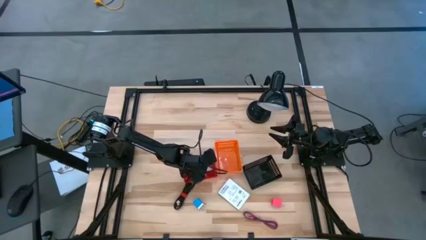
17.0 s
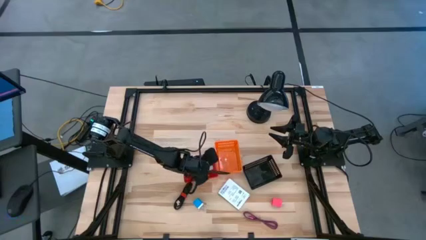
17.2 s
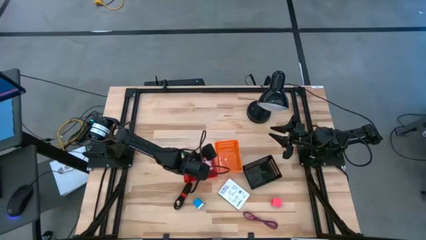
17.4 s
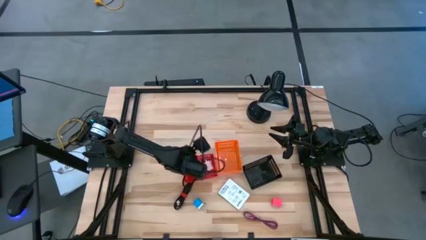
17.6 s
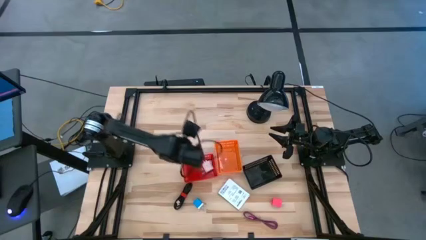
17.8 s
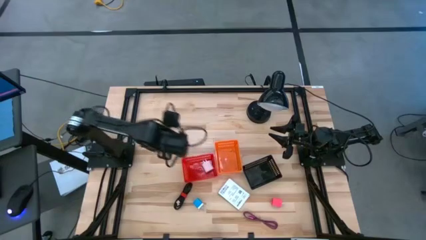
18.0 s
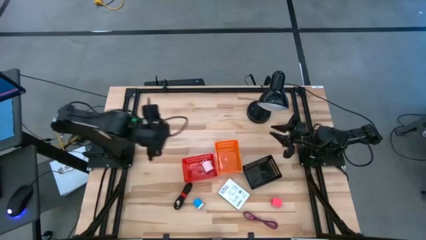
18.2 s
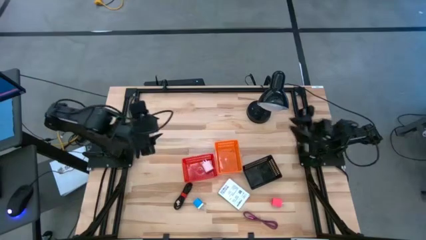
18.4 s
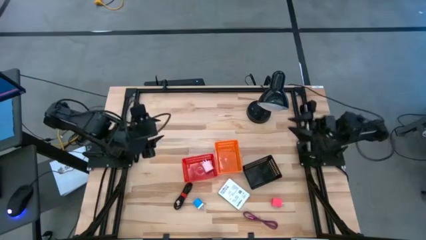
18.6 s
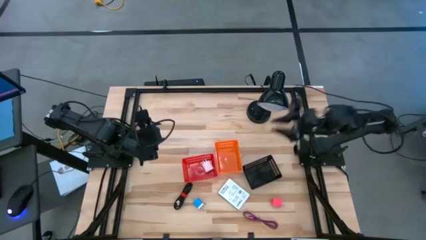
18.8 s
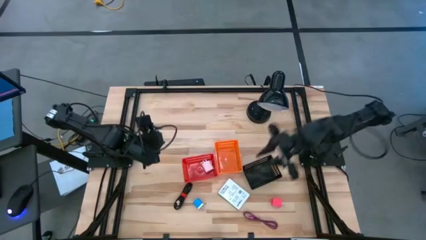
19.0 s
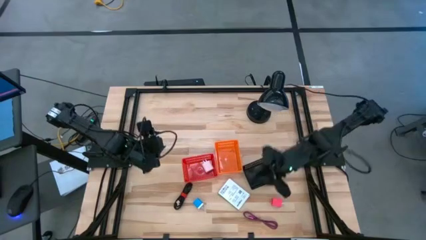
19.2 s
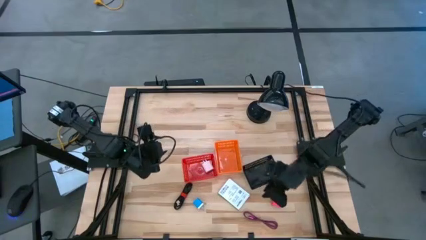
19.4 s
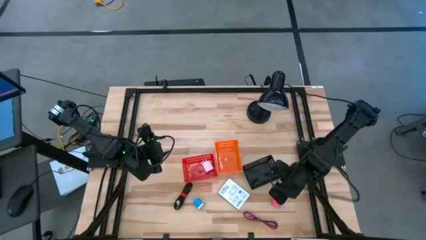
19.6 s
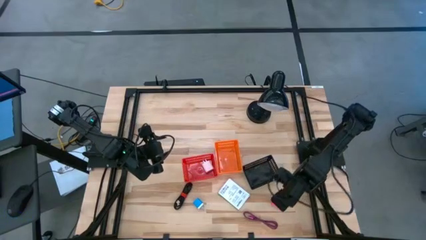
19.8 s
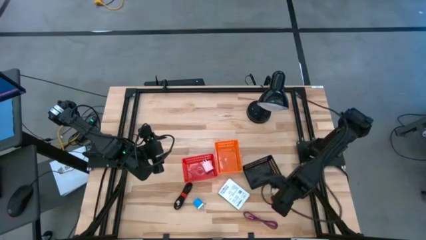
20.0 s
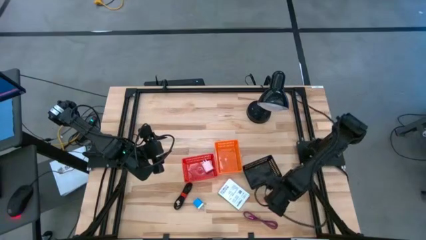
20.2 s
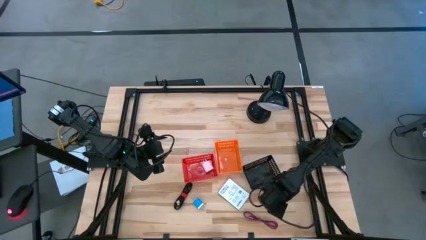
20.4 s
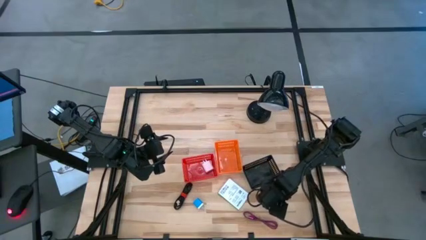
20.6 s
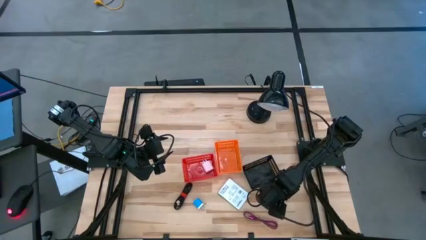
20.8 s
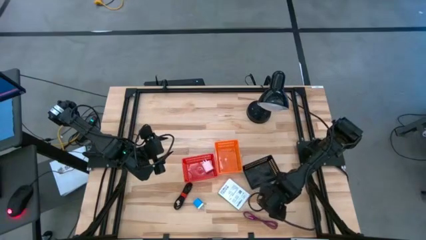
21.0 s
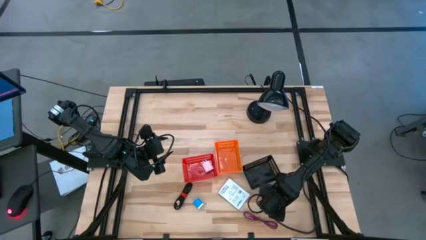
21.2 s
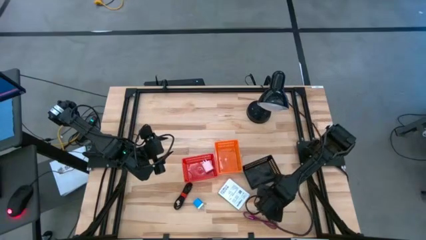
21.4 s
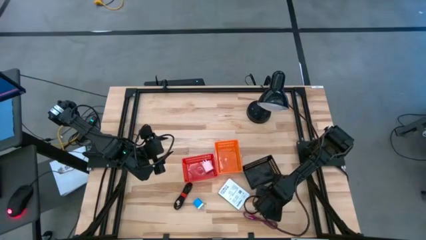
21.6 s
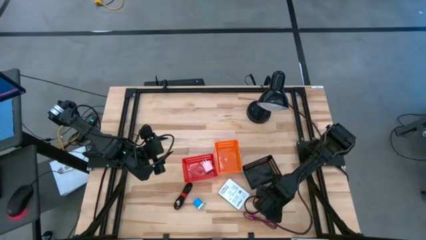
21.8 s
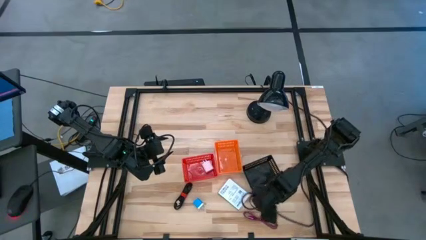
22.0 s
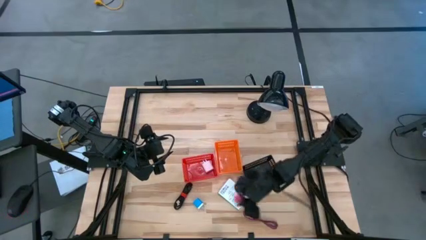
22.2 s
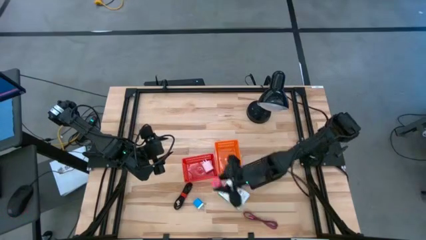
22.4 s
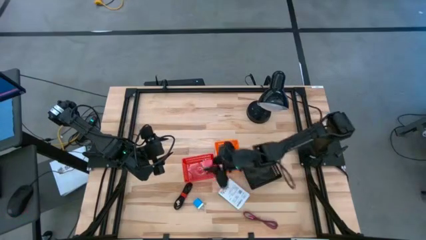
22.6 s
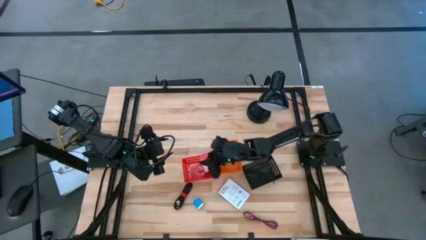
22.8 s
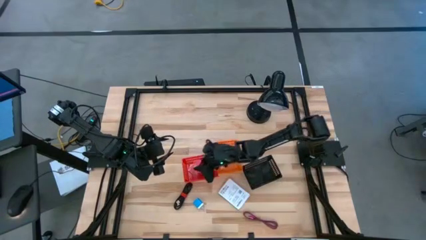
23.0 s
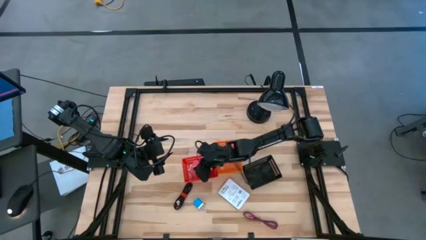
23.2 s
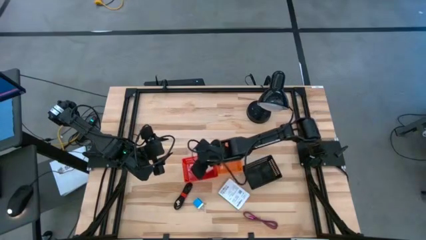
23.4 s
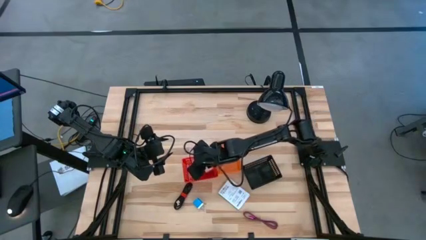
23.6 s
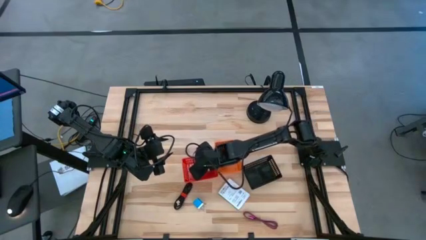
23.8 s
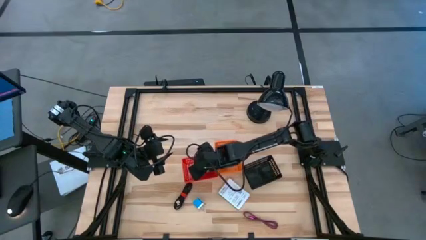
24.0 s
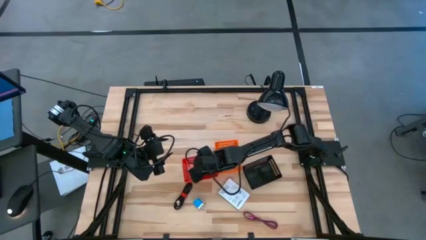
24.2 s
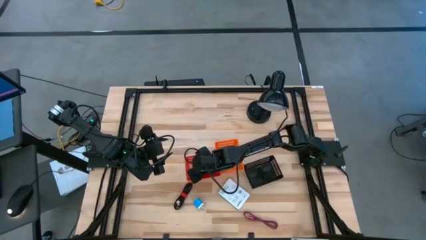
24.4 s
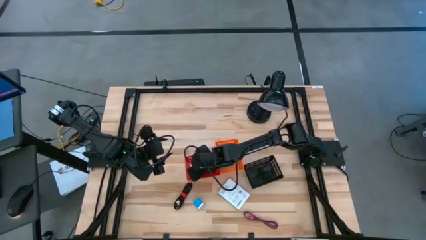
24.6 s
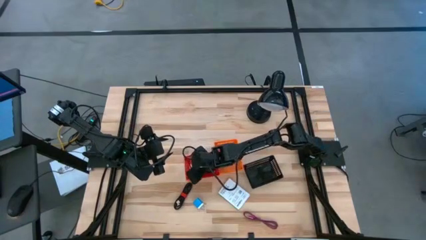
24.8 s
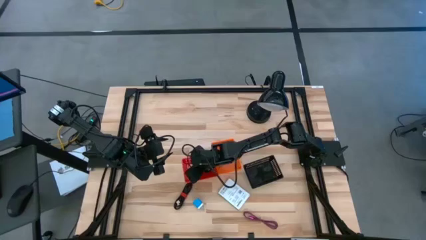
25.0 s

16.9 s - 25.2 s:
Task: Pick and place items into bin
Put the pink charger adapter into the red bin

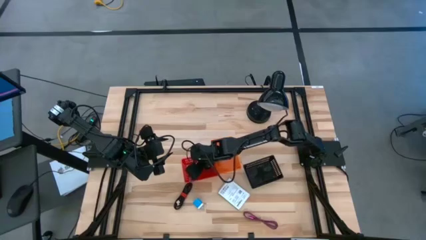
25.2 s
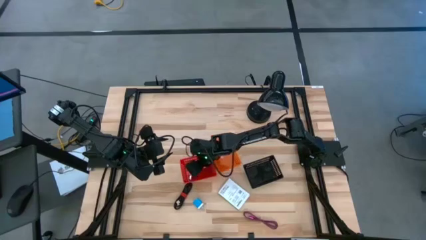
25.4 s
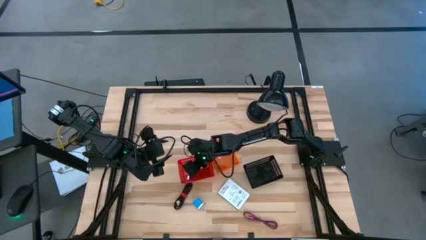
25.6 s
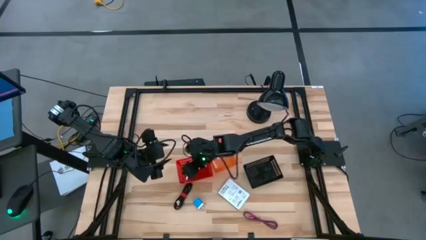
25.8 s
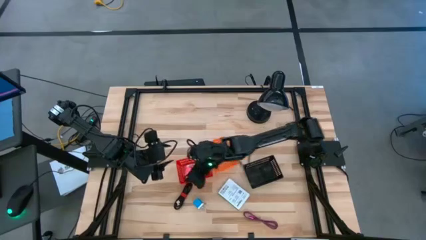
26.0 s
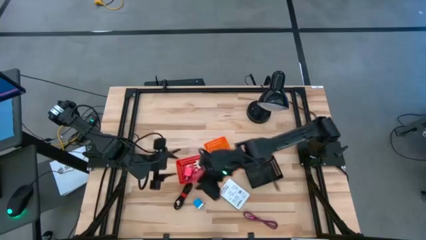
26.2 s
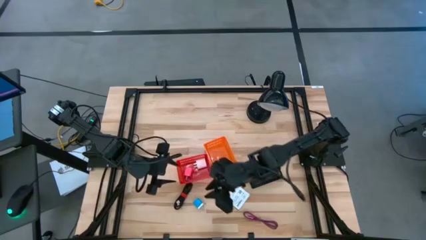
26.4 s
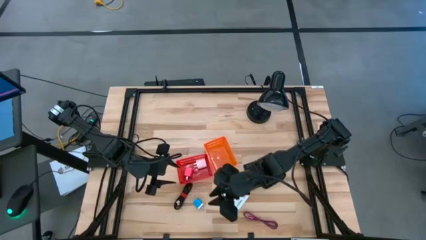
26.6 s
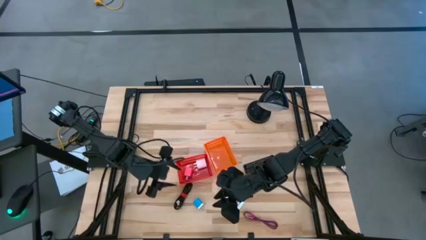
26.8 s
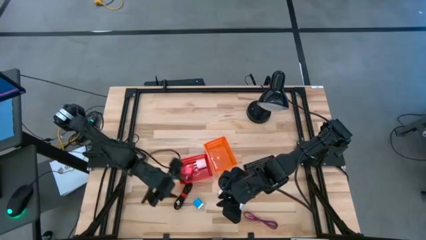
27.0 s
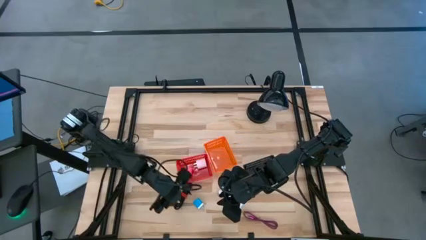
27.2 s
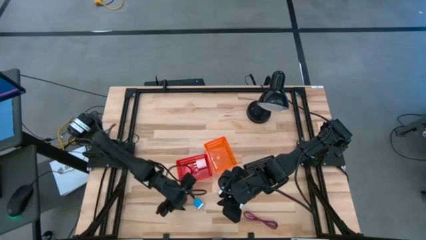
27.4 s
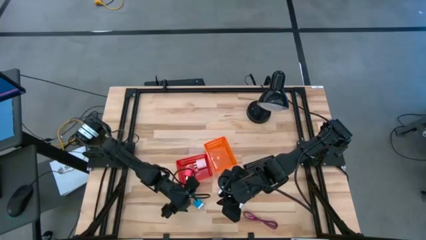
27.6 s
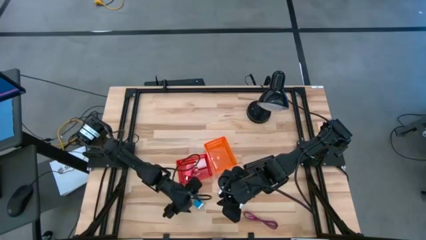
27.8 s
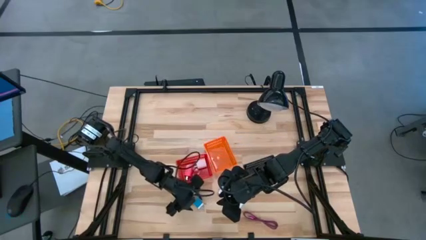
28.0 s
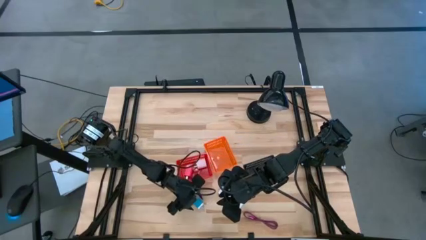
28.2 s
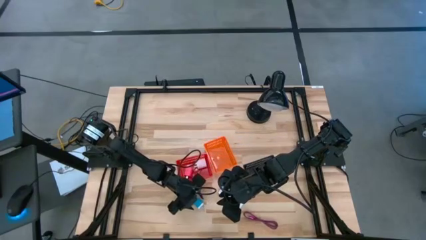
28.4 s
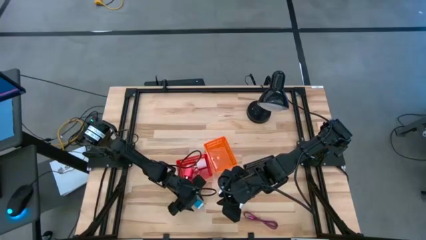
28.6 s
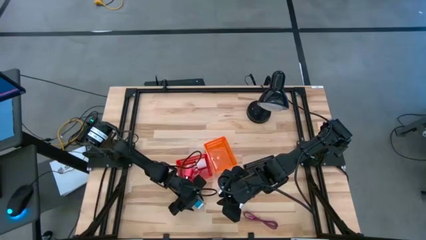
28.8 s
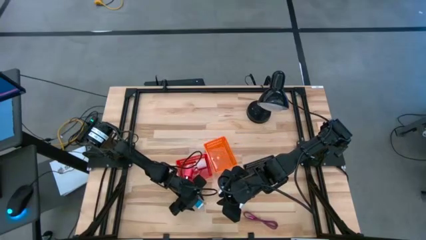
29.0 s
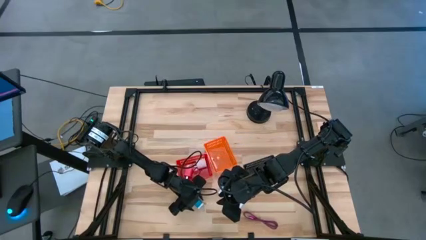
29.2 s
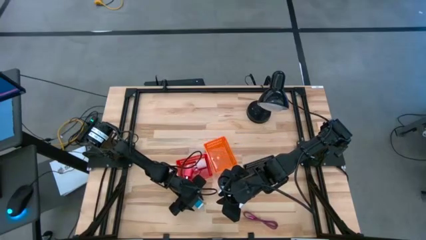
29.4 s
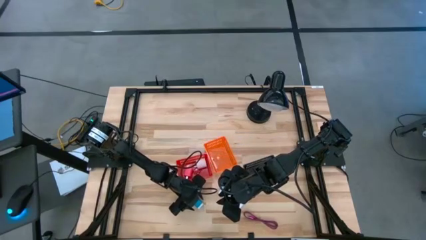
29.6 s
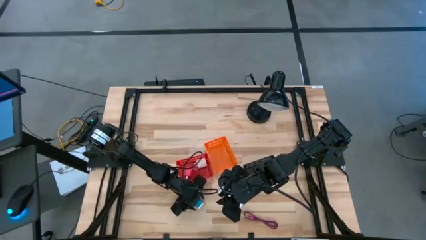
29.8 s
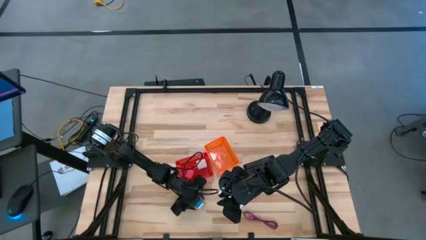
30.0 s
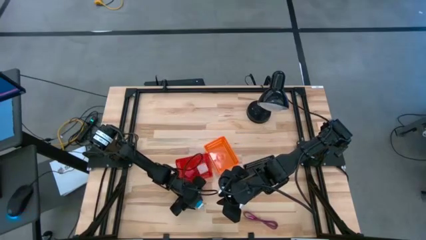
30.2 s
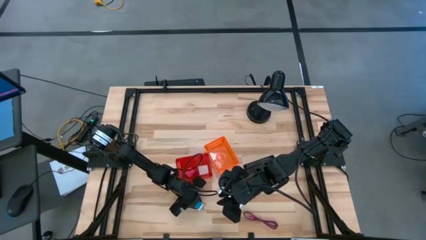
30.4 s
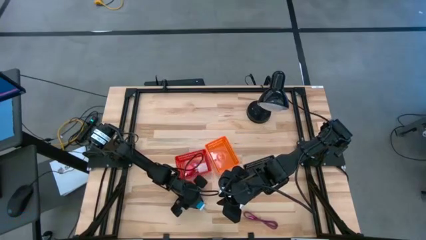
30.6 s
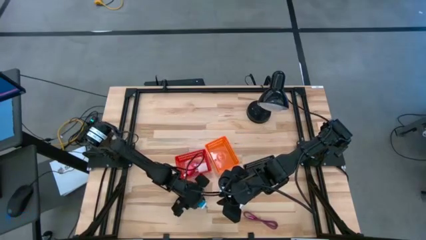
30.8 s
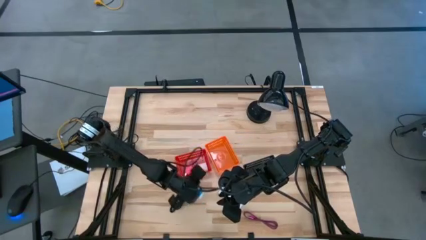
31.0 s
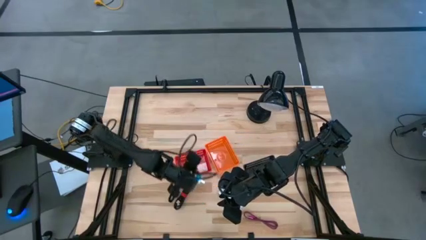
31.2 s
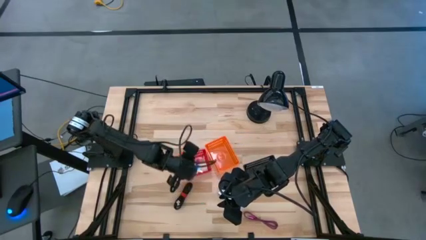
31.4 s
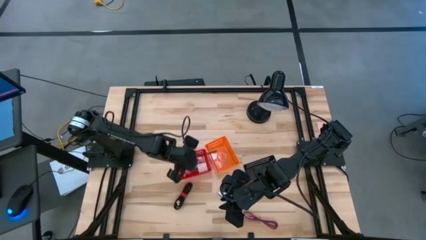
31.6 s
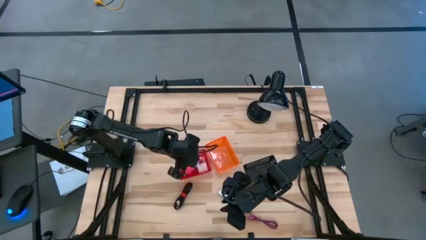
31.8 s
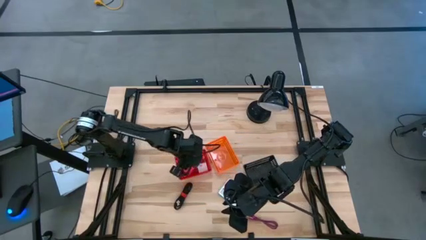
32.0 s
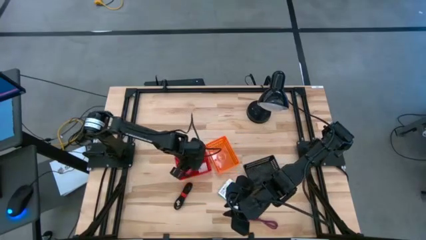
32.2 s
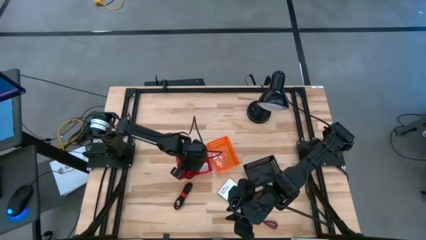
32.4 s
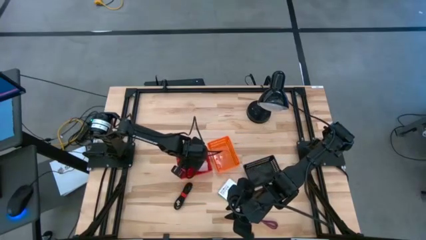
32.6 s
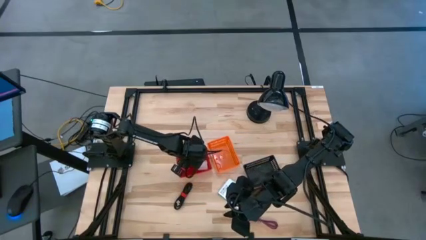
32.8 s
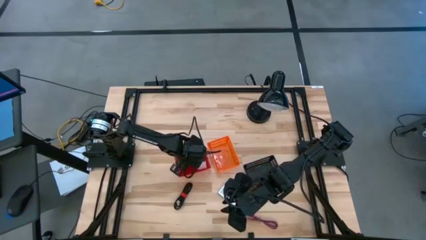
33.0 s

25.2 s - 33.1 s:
Put the blue charger adapter into the red bin
